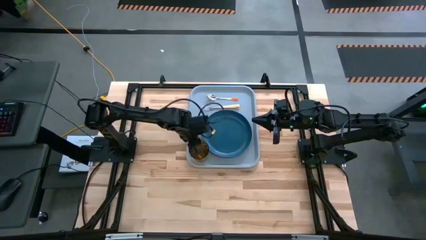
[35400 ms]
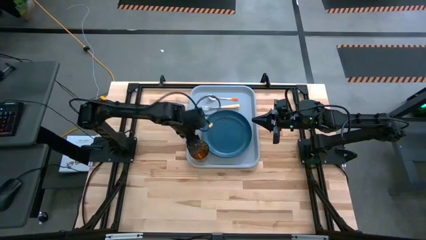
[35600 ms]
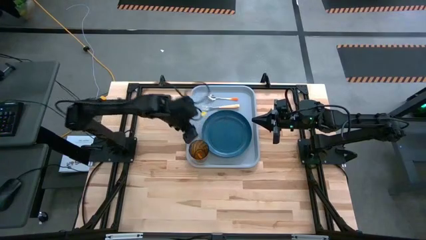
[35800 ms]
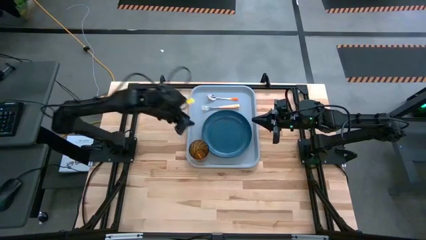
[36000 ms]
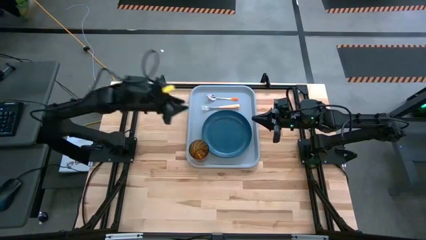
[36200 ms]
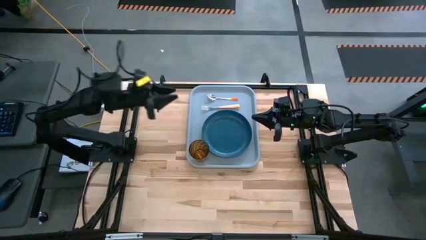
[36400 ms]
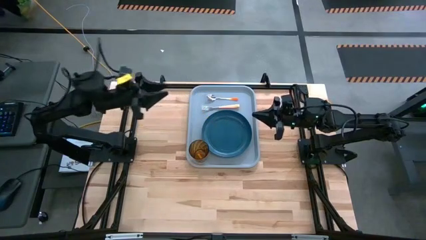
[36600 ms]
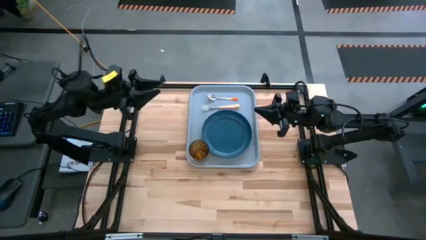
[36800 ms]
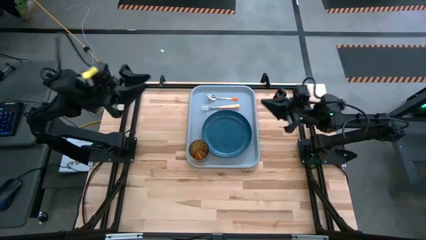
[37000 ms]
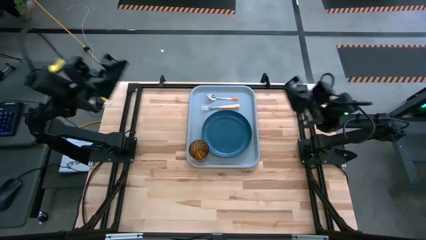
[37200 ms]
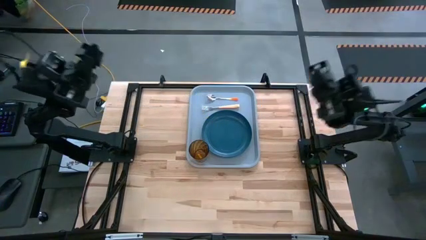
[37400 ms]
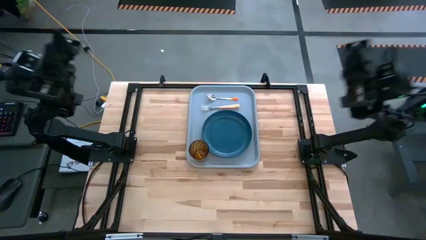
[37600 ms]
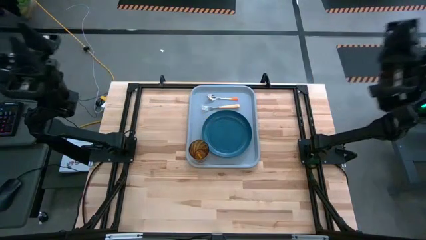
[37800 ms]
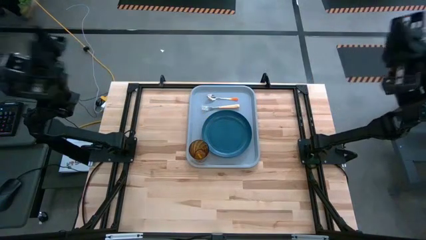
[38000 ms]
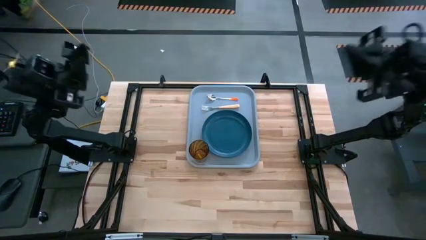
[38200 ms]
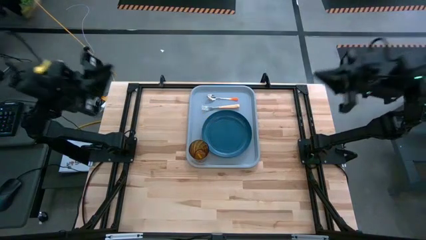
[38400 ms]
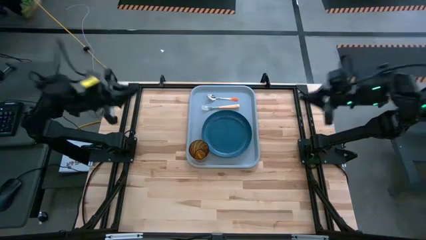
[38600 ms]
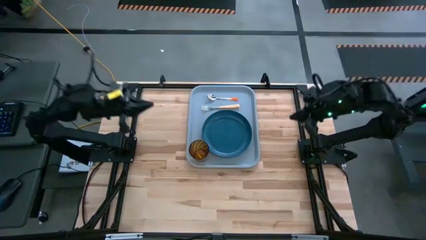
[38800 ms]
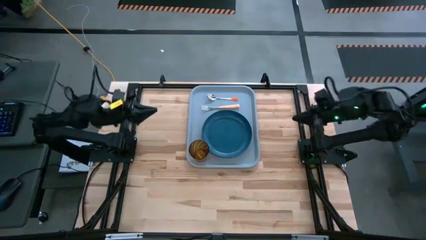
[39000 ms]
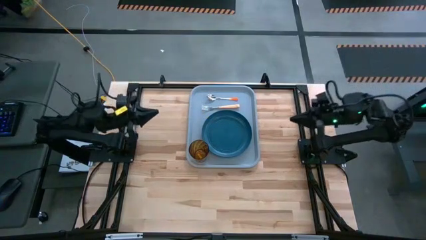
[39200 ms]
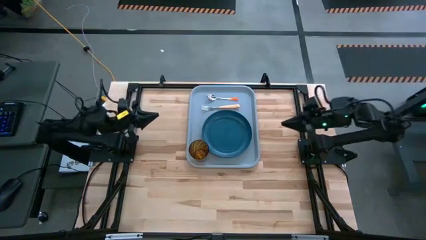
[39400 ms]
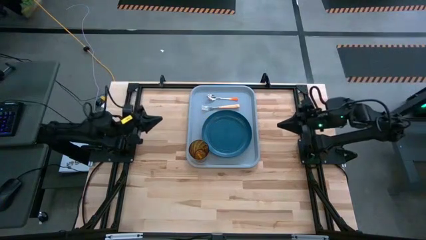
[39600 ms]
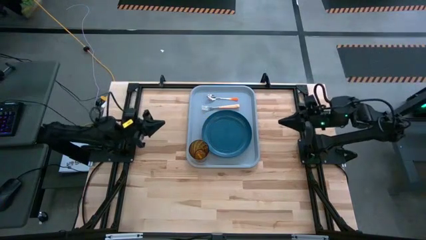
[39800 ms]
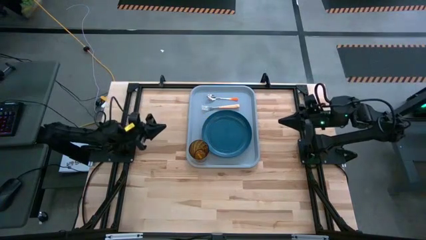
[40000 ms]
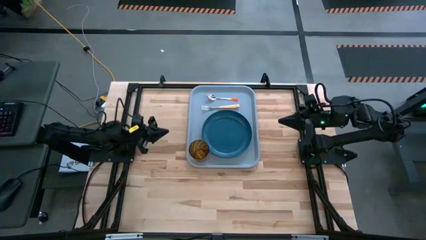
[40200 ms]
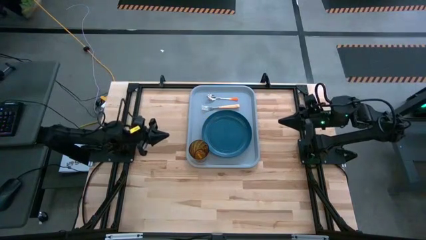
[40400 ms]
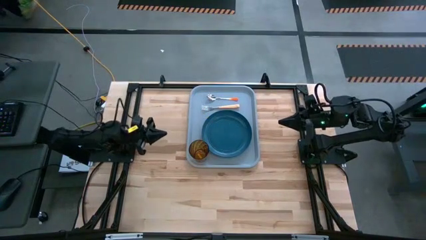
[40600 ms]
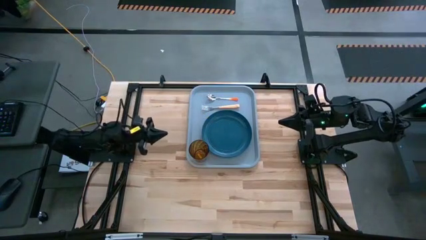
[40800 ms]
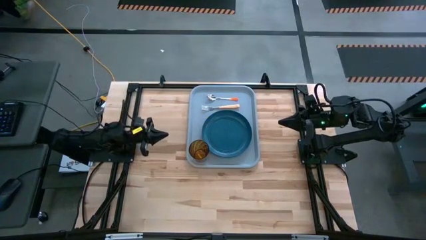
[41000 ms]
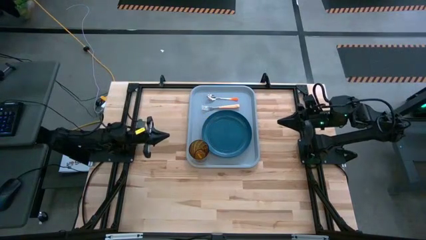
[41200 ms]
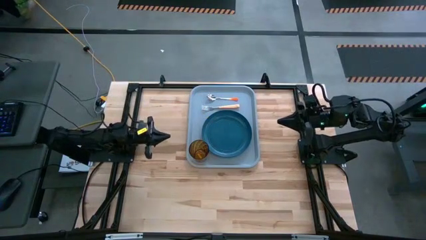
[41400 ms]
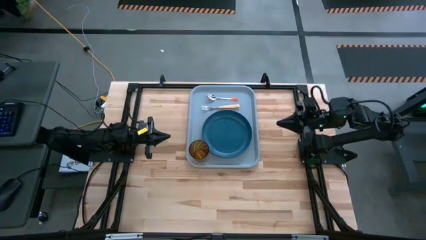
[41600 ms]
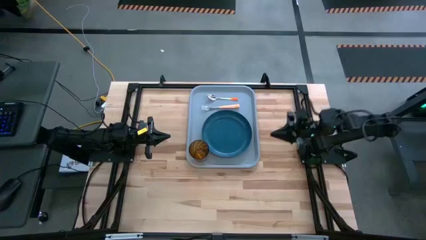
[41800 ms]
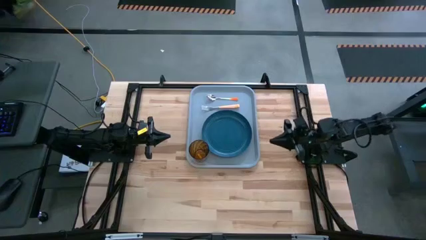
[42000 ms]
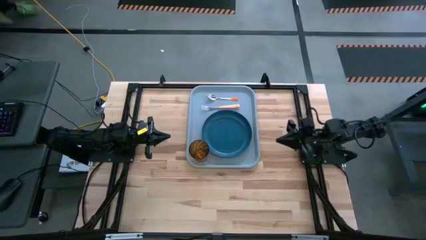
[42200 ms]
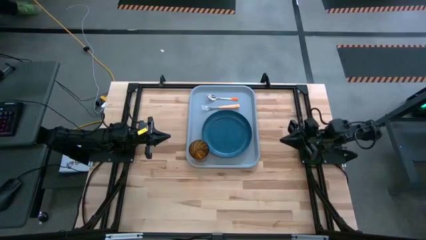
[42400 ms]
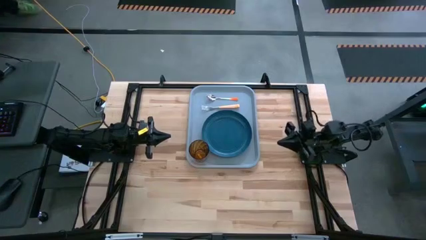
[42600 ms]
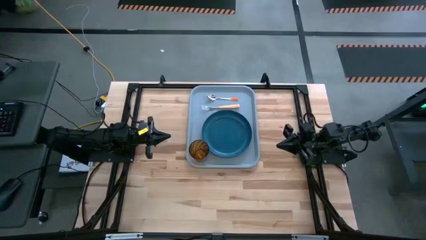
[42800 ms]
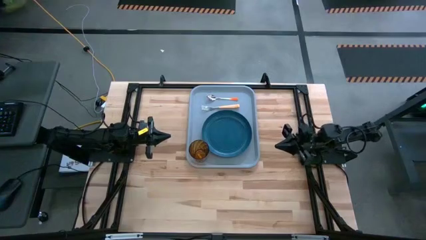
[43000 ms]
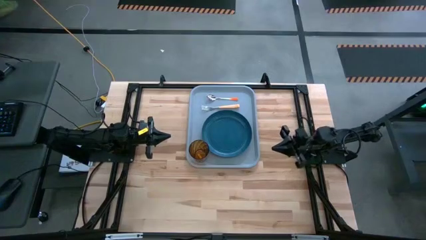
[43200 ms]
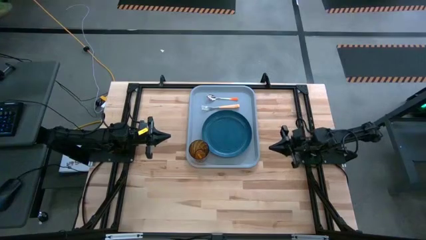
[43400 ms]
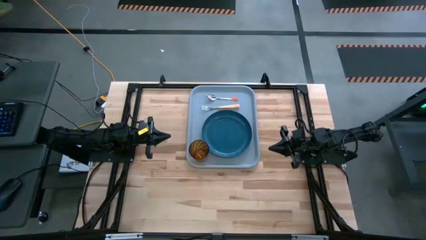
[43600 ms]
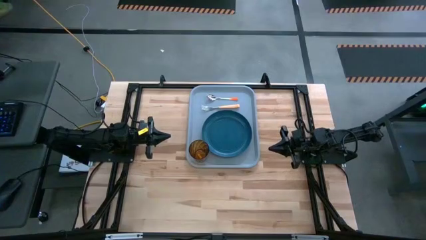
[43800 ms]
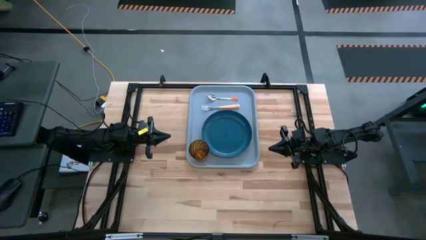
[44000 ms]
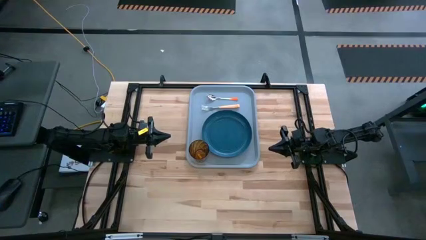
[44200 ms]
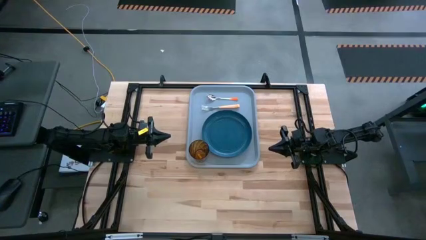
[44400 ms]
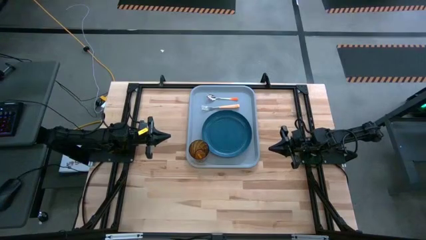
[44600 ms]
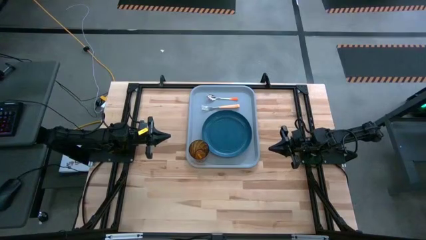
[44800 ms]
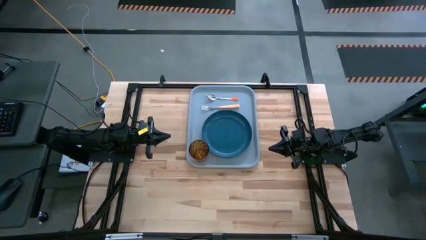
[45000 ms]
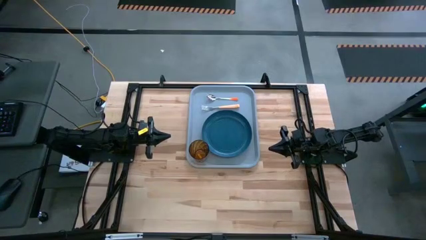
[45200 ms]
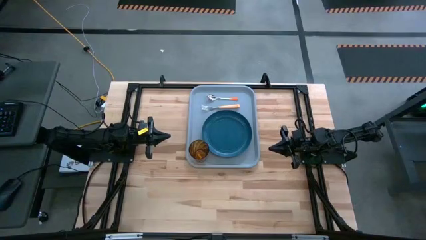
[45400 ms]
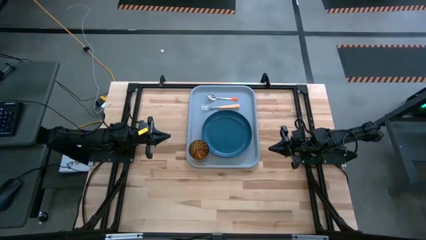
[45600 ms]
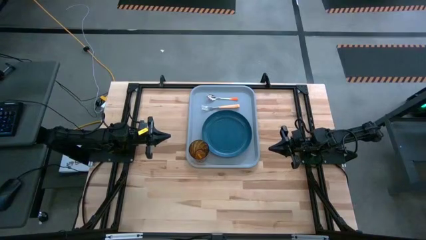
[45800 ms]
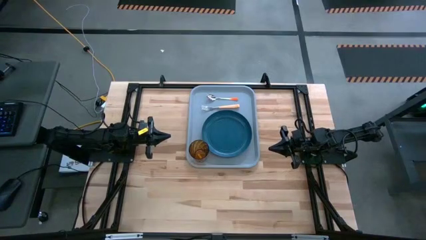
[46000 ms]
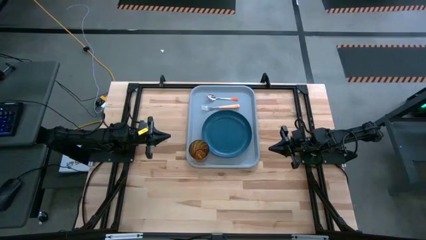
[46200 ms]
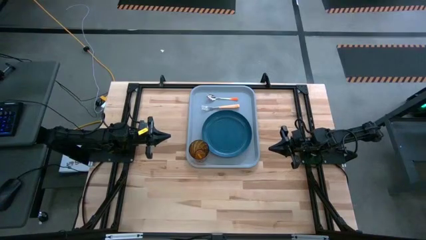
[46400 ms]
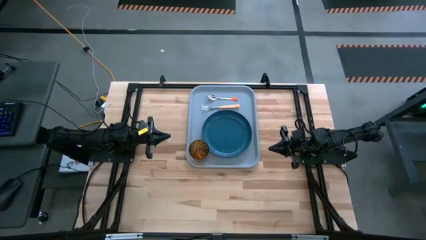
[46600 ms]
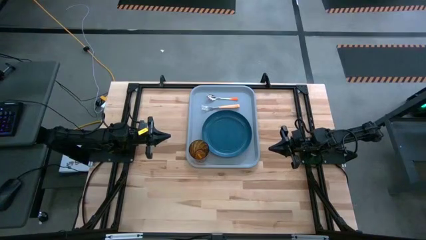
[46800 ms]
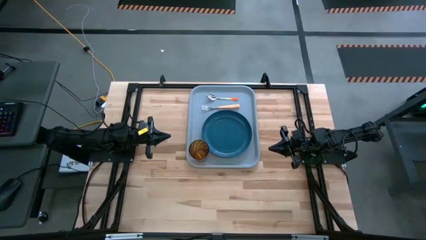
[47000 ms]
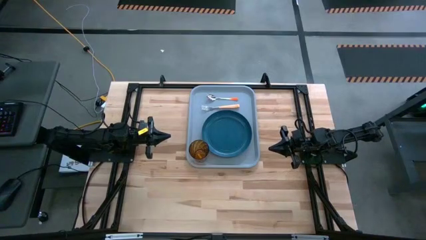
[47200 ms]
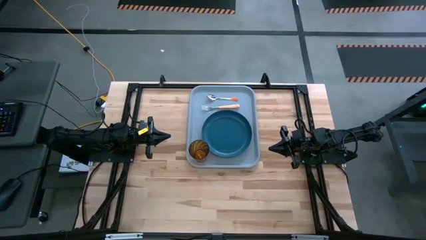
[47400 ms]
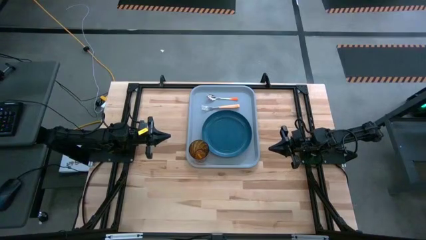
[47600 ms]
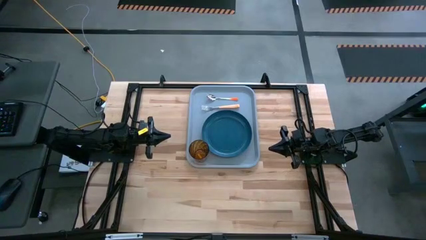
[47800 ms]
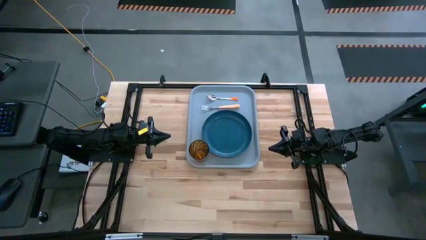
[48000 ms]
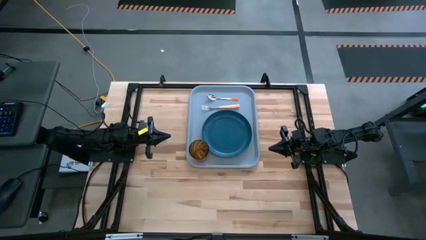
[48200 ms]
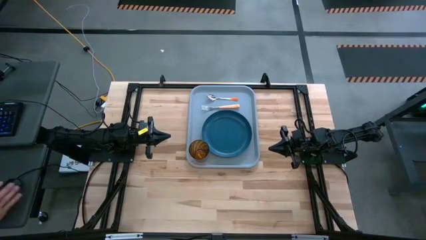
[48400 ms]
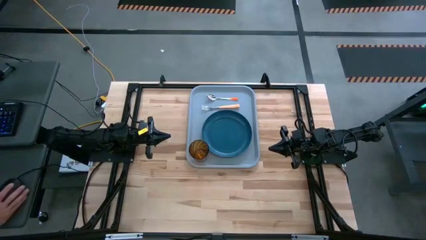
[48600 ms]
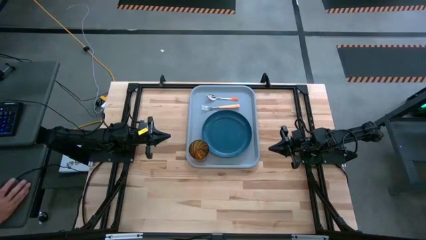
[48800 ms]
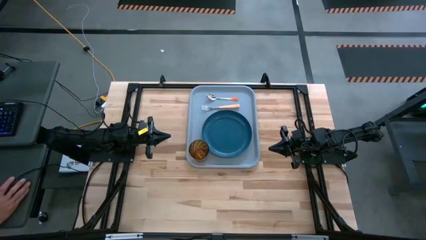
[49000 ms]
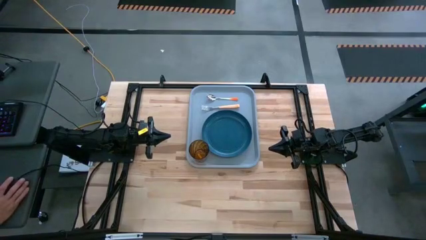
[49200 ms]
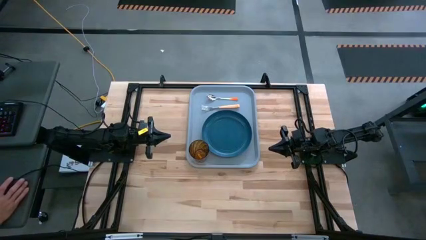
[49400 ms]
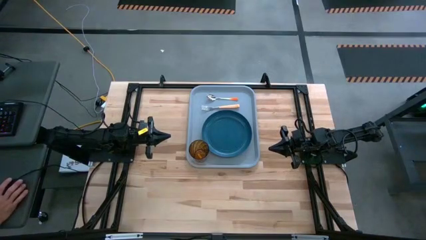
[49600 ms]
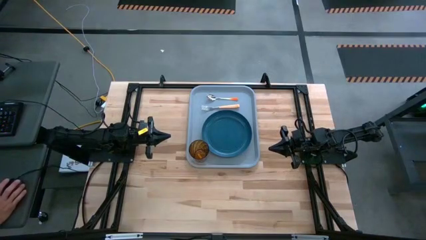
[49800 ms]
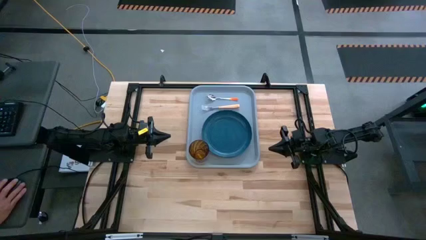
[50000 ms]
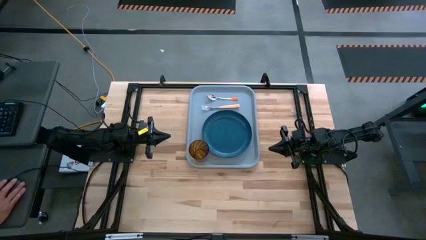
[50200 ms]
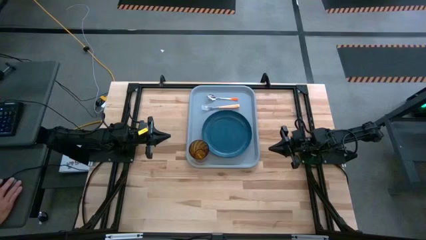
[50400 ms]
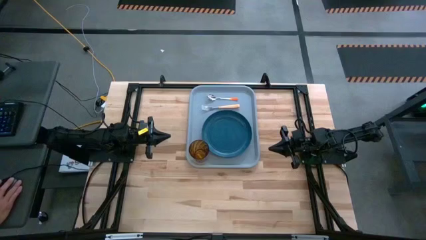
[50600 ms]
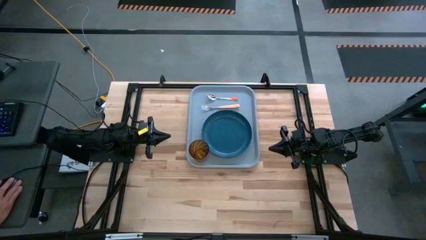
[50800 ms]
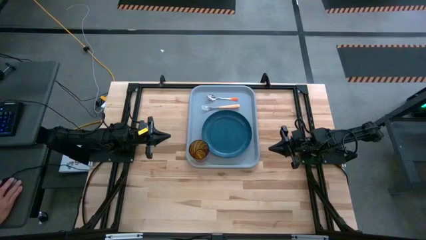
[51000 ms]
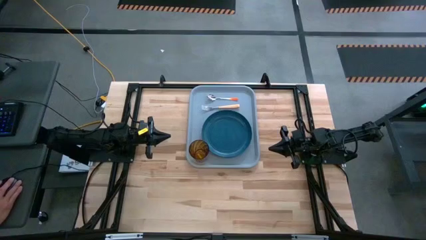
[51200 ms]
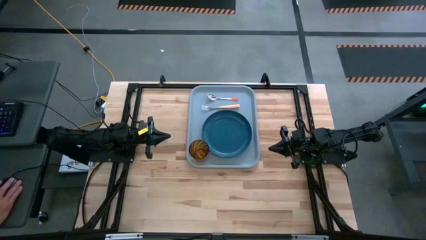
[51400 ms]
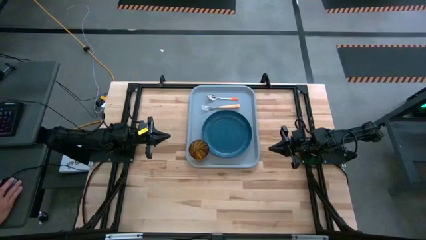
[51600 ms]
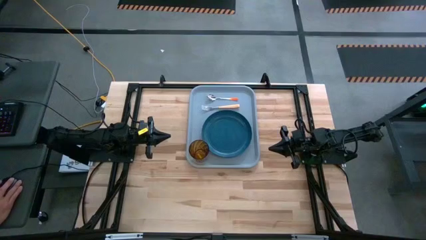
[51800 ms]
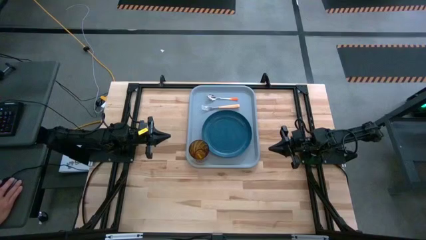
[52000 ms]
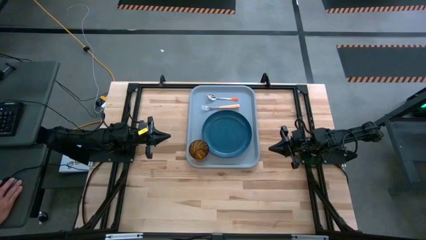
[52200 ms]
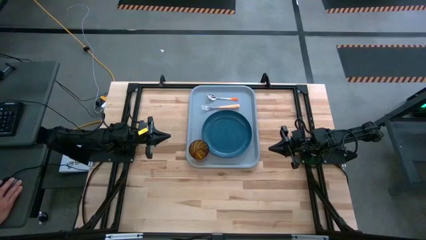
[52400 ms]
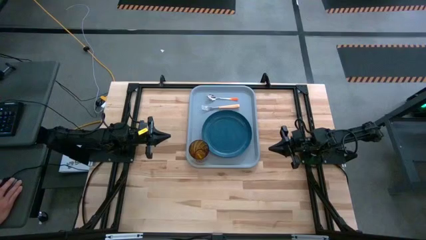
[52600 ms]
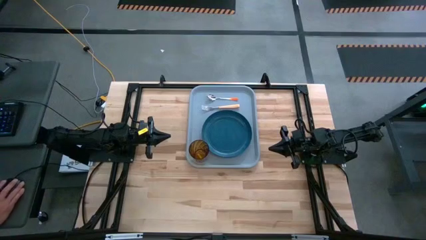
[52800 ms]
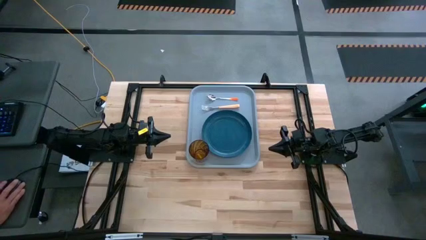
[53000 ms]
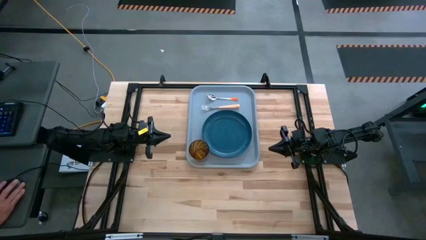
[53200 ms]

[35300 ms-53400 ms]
Task: Pick and place plate/cup/fork/spoon on tray
Return to Home Position
